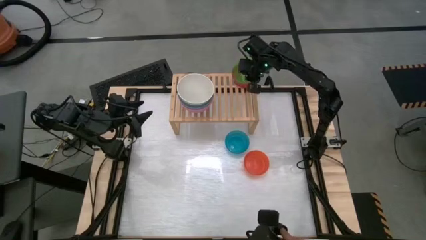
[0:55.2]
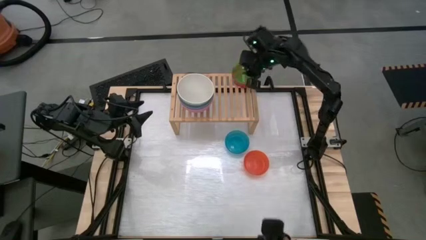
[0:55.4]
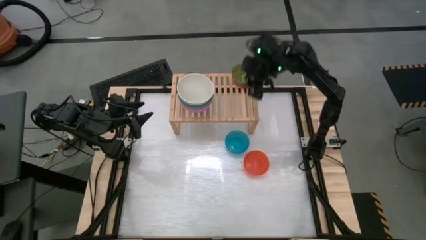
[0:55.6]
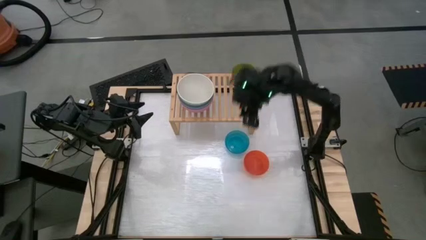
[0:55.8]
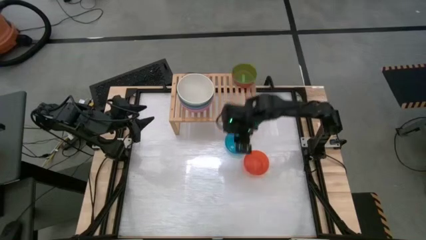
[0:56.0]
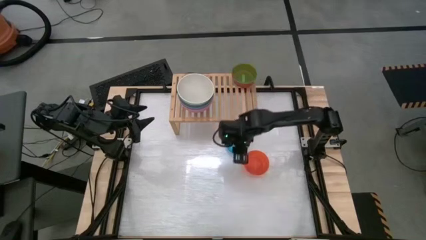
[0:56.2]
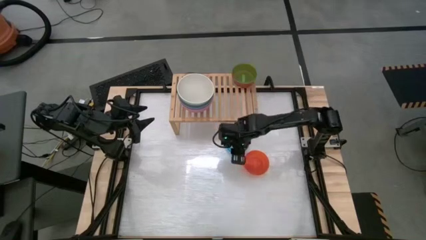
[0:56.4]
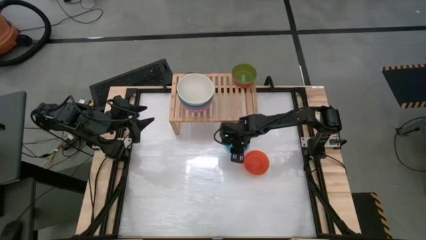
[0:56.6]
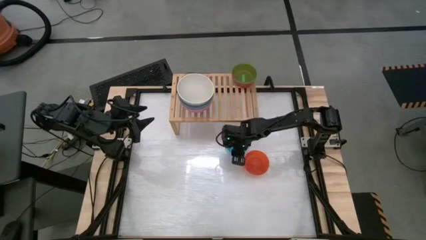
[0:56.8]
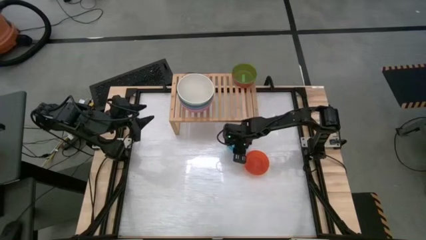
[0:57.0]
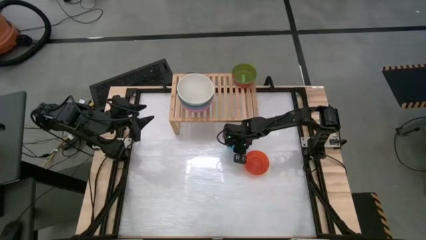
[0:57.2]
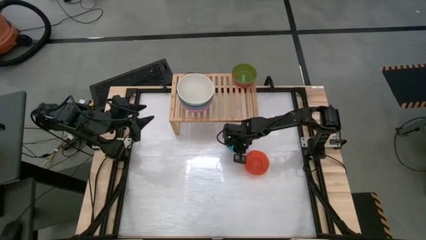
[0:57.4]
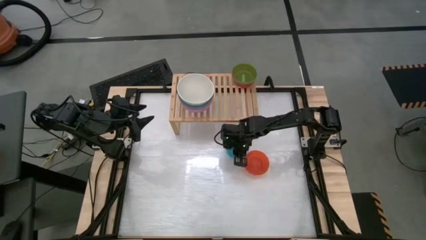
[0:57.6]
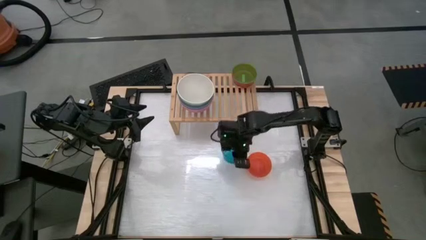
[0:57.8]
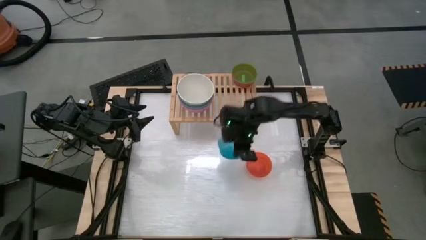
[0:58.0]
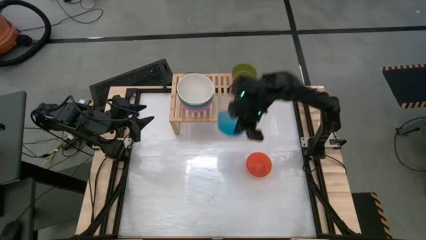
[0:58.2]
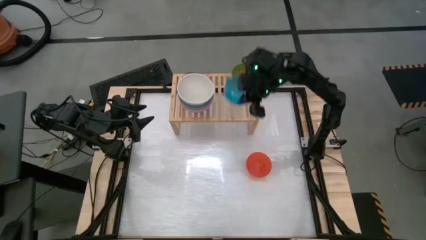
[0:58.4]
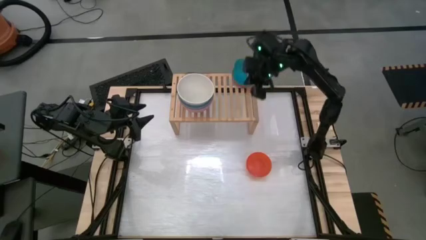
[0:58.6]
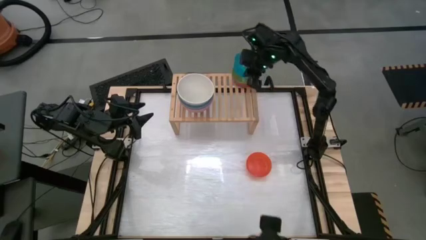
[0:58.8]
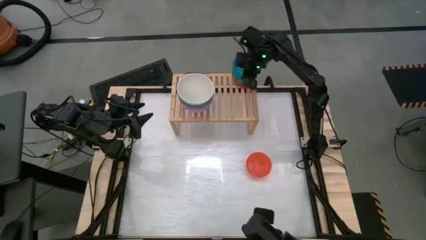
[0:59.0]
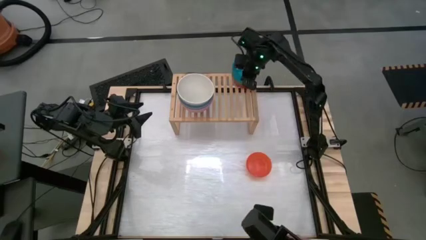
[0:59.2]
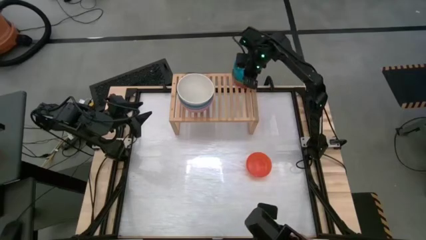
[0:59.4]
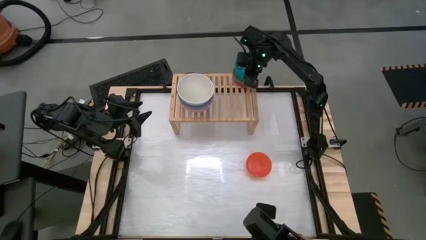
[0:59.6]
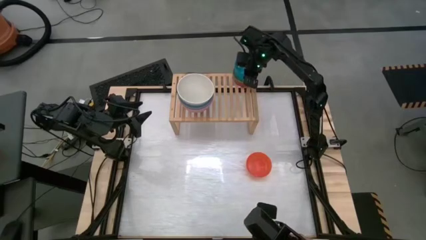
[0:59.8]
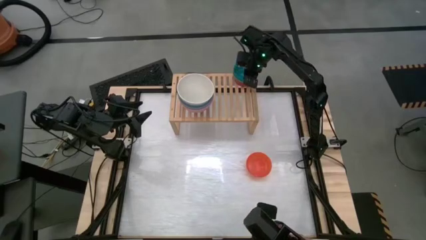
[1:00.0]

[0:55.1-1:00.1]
Task: Place and stack bowls onto a shelf
Stack the blue transparent bowl on top of the green transparent bowl on the shelf

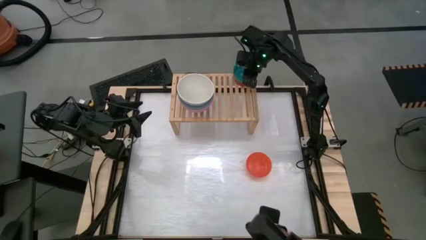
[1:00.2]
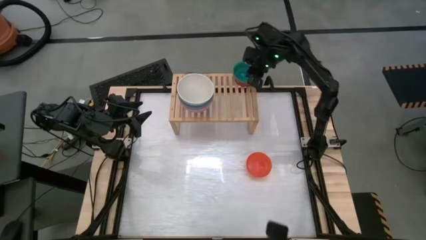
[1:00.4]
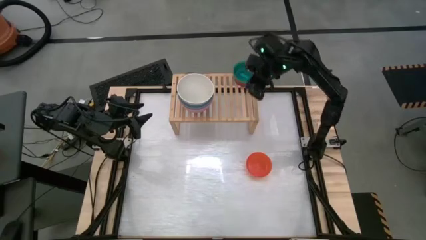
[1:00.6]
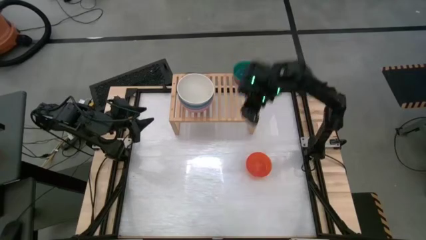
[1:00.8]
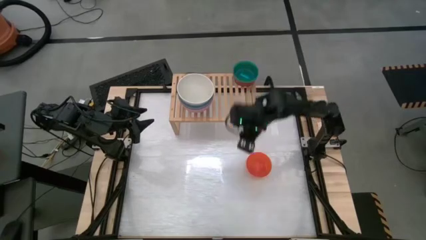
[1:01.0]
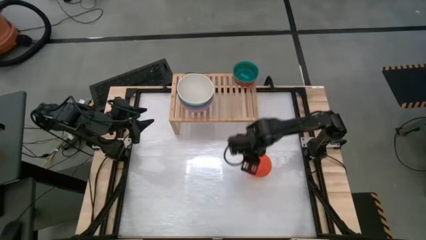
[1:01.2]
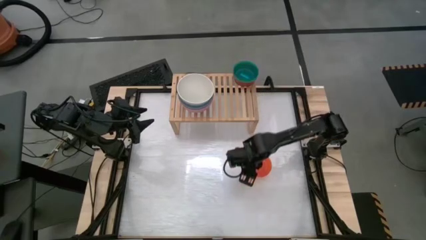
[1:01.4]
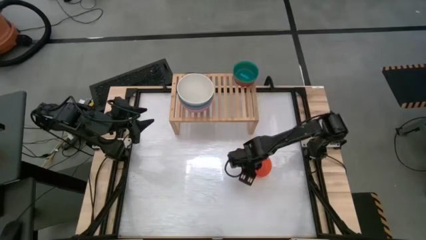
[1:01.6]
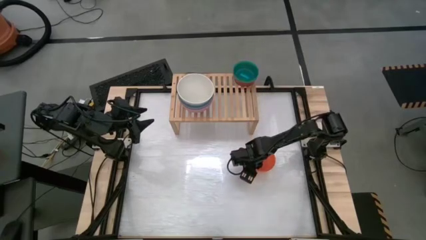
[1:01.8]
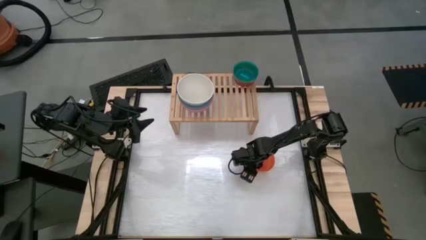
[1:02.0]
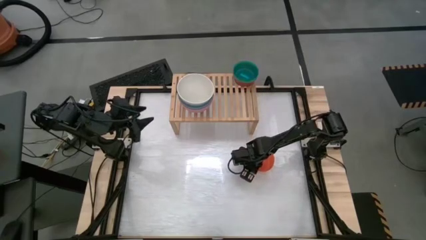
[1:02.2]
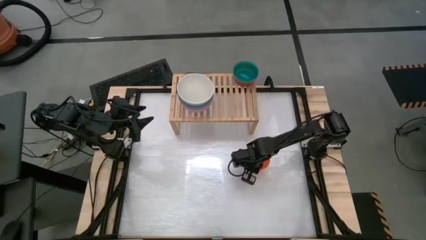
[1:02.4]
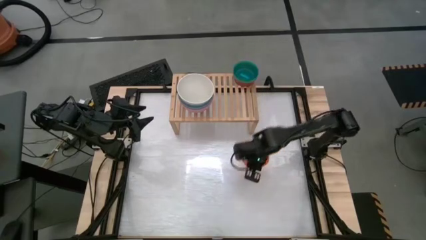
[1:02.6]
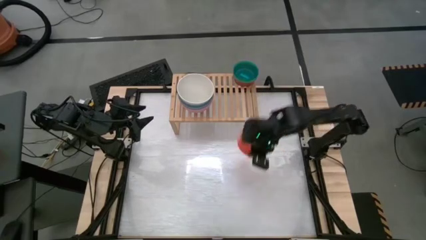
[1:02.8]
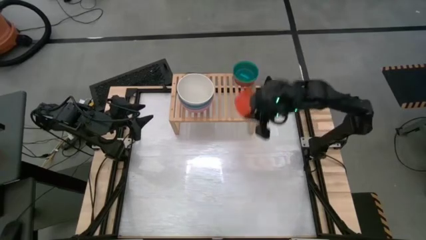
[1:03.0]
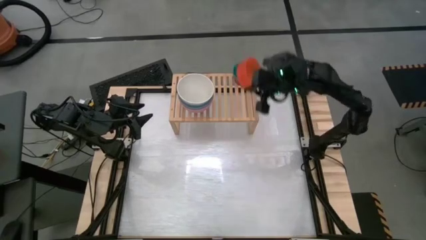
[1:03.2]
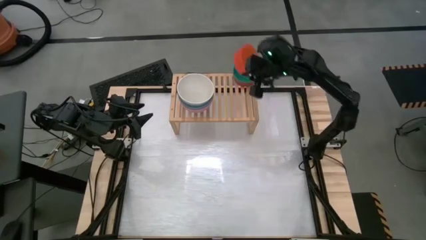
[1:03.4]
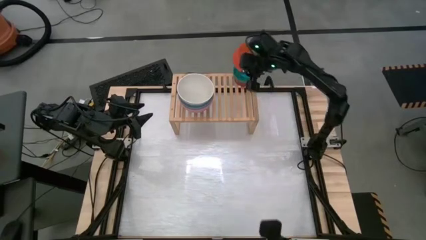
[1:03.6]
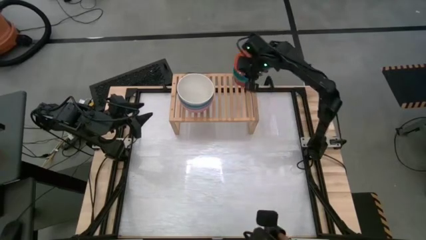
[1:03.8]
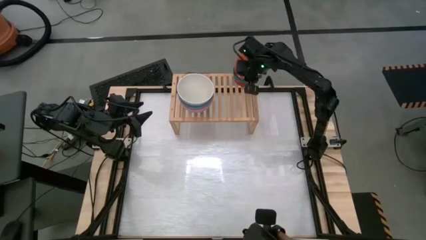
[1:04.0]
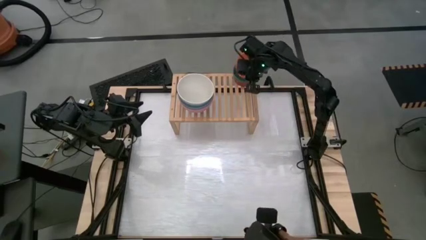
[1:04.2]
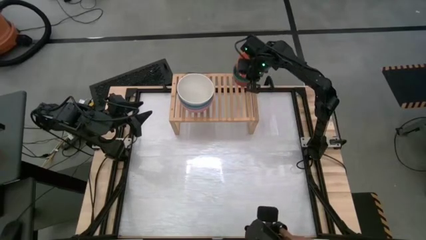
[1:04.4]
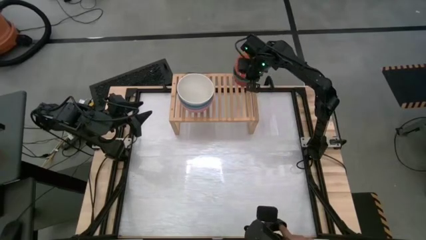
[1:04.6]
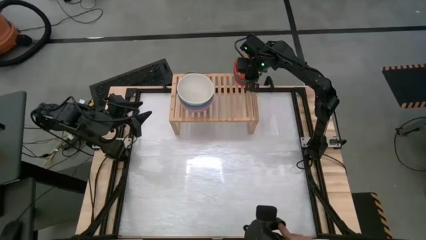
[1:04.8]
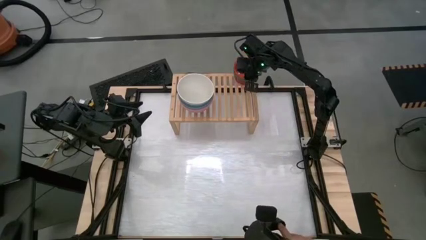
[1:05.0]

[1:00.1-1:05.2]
Stack the orange transparent bowl on top of the blue transparent bowl on the shelf

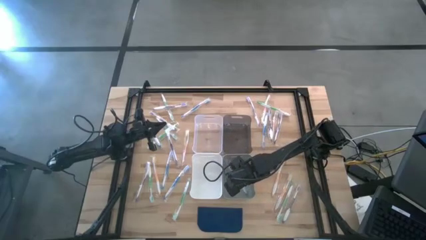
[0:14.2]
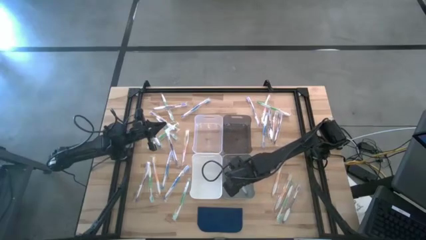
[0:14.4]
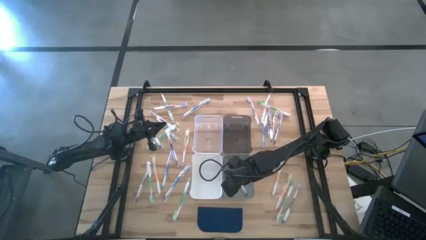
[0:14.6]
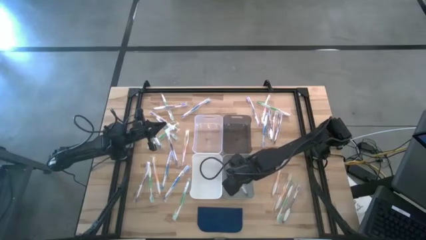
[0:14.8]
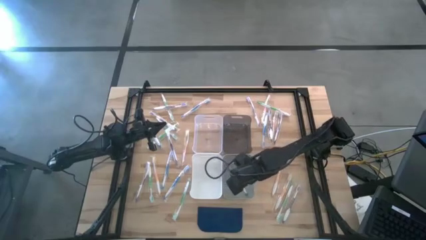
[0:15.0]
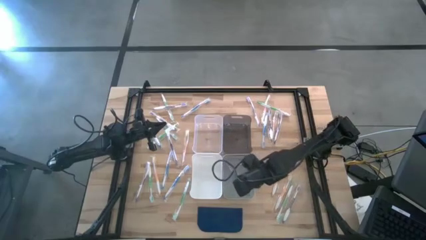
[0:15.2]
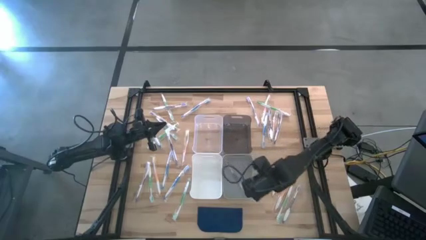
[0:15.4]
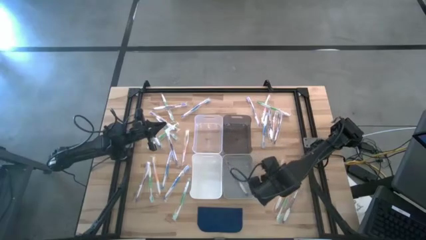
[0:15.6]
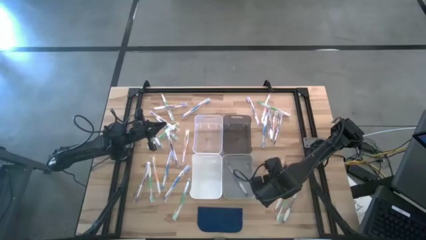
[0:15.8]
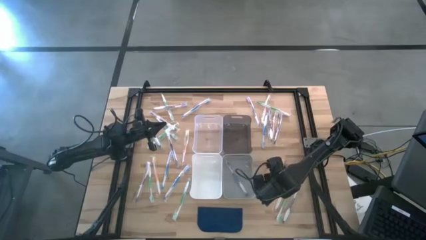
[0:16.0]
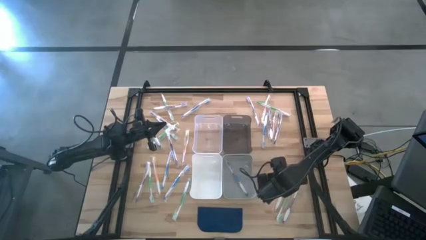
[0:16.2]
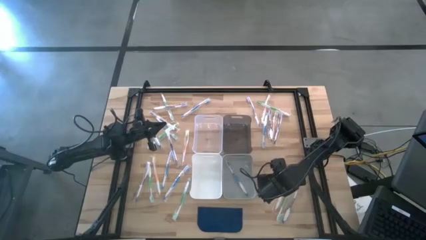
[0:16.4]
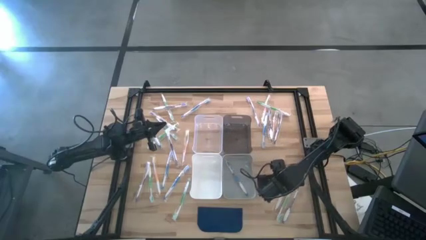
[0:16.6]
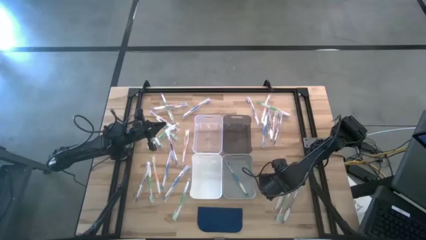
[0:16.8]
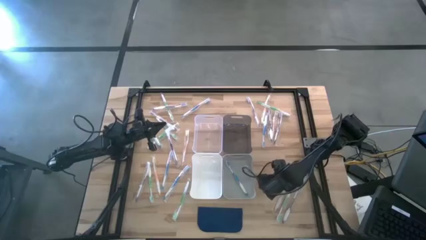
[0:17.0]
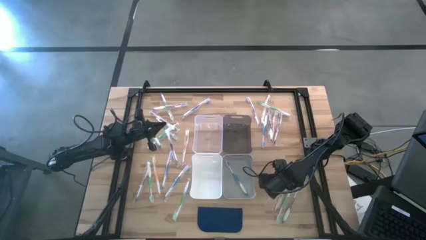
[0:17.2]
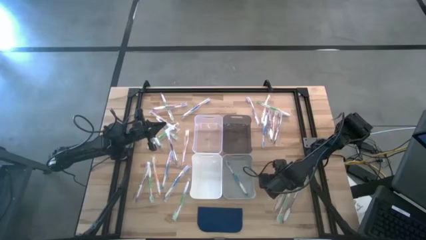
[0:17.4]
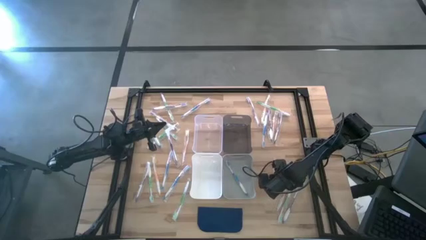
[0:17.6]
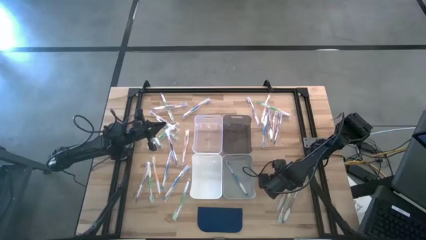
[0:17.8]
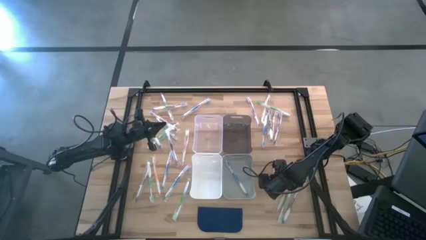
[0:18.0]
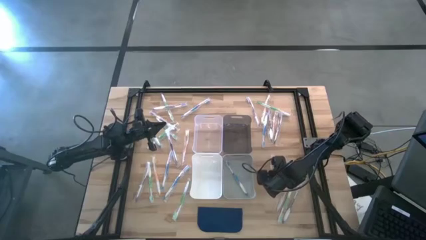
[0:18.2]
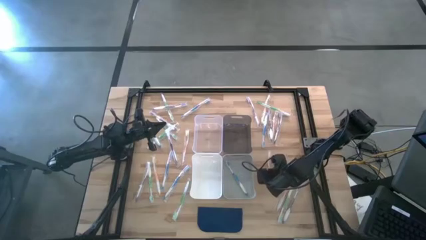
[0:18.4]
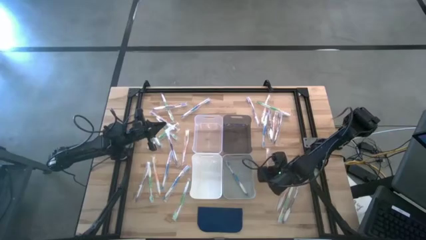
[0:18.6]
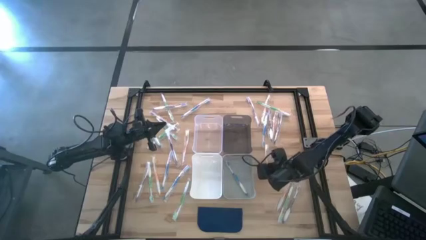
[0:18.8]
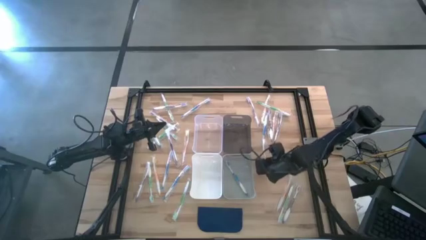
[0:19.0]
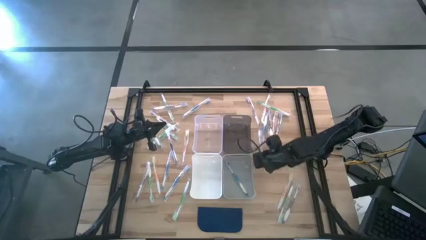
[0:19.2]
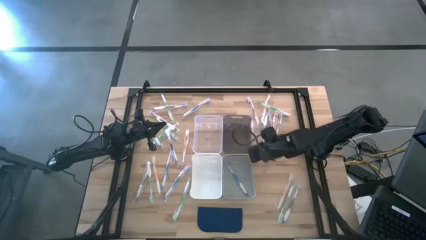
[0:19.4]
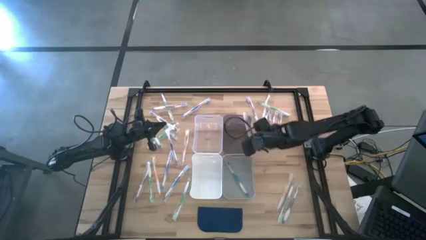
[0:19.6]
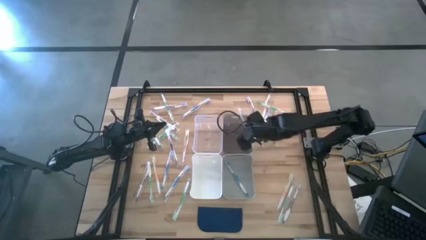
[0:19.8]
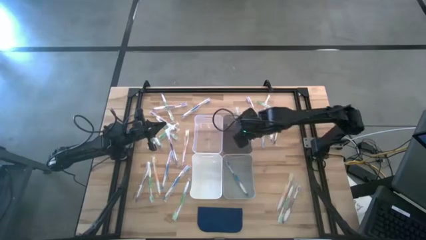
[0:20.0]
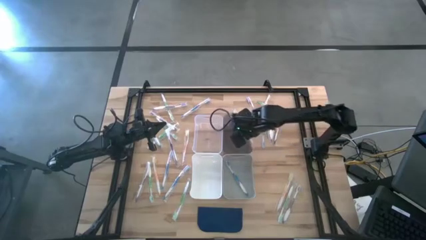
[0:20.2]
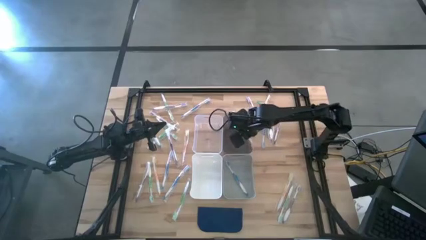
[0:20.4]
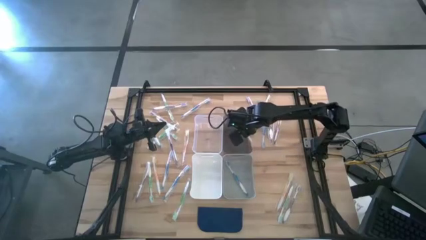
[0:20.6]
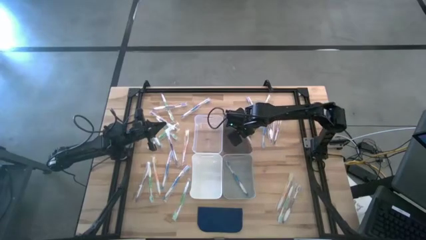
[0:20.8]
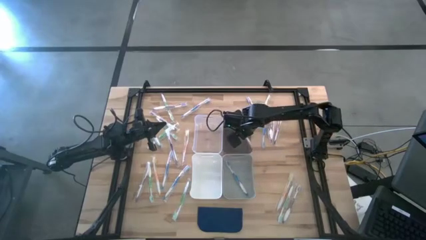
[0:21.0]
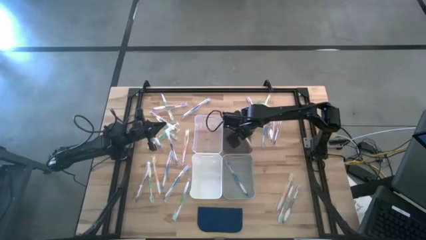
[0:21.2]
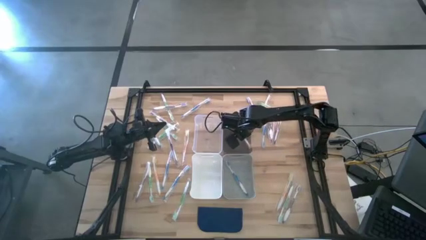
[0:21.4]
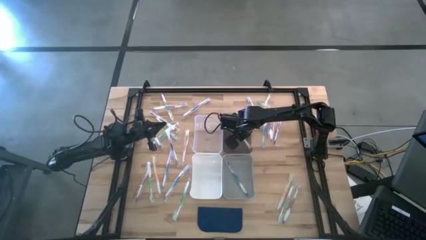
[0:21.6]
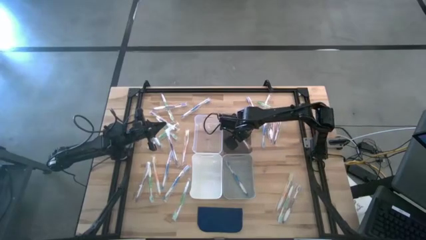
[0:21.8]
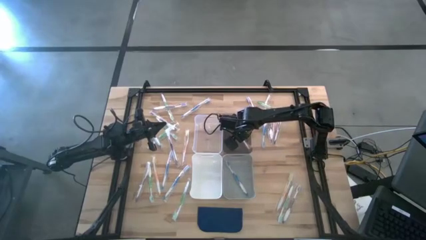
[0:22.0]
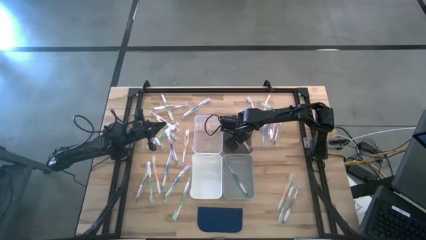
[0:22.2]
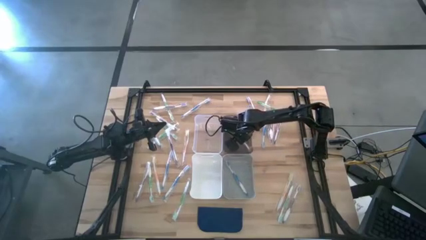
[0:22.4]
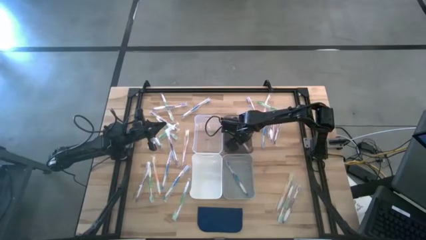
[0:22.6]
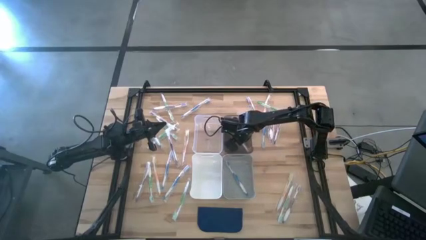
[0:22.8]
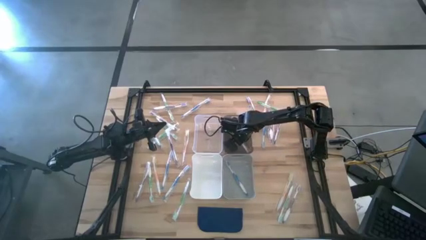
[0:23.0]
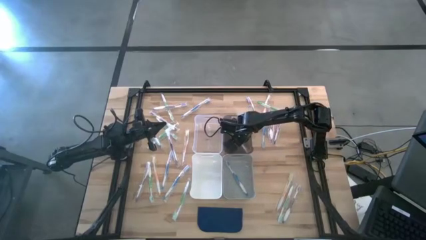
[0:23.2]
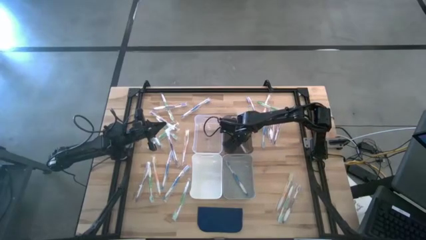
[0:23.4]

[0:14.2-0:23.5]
Task: Pick & Place Toothbrushes
Put the orange toothbrush into the black bin
